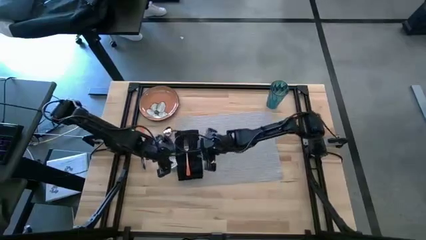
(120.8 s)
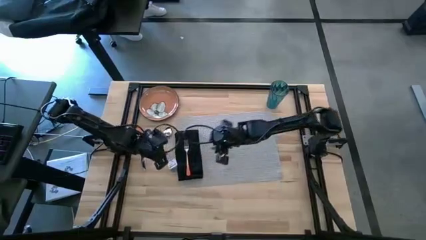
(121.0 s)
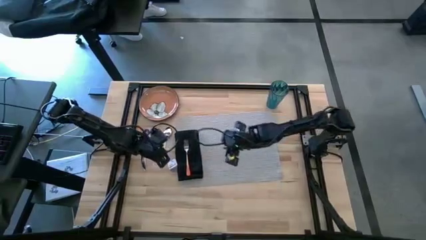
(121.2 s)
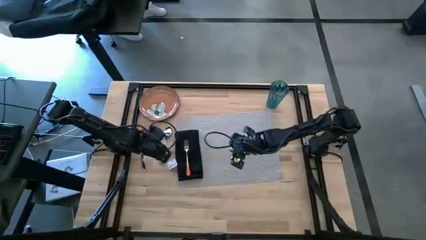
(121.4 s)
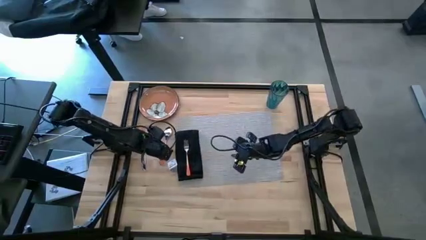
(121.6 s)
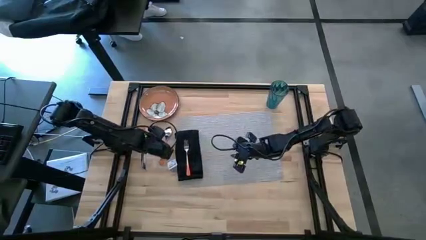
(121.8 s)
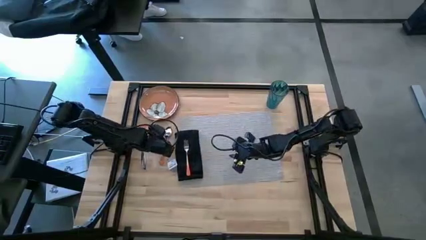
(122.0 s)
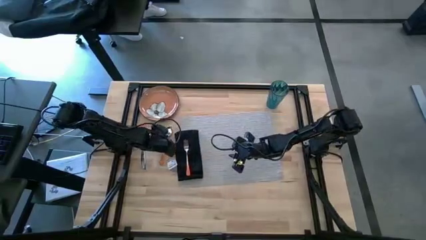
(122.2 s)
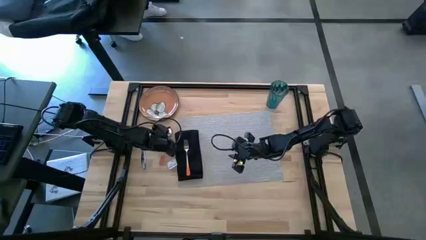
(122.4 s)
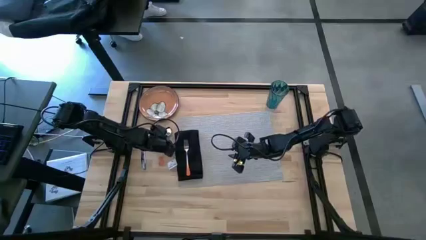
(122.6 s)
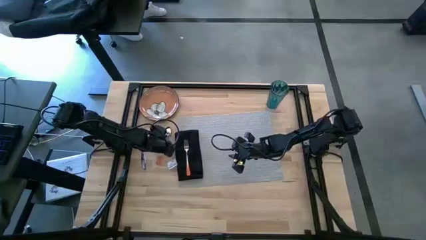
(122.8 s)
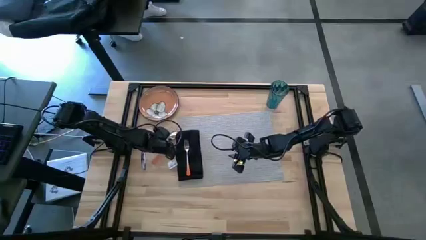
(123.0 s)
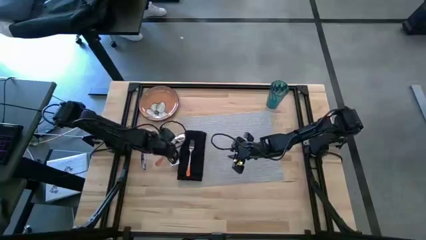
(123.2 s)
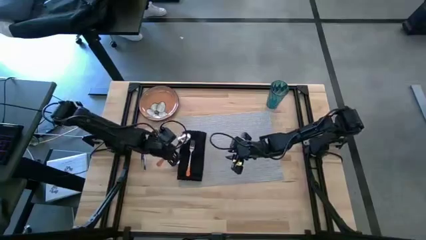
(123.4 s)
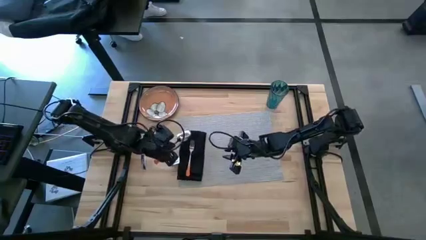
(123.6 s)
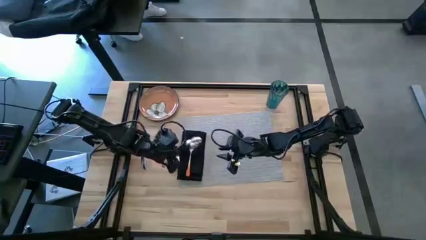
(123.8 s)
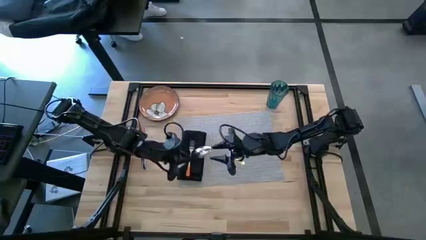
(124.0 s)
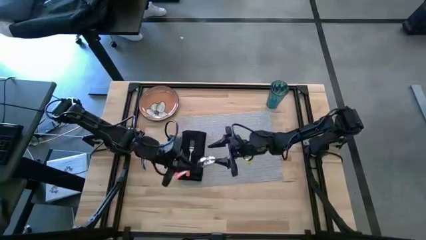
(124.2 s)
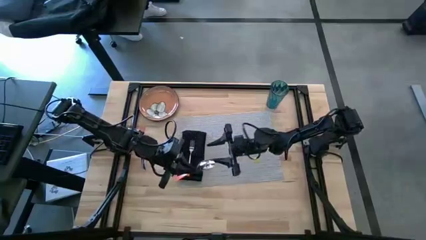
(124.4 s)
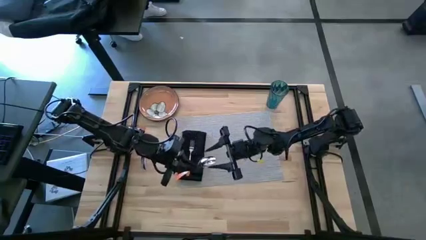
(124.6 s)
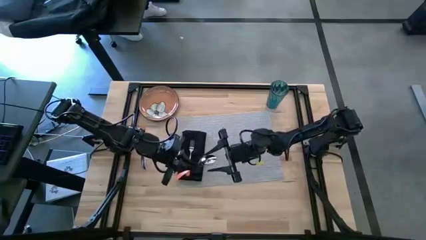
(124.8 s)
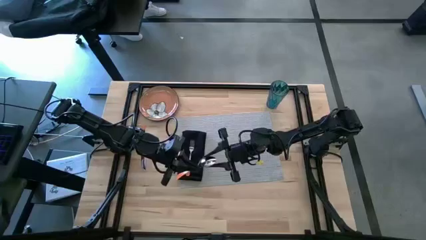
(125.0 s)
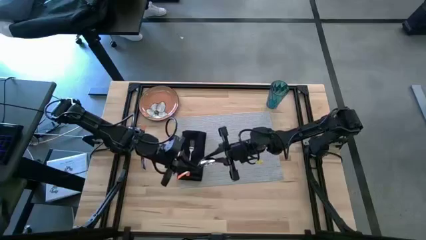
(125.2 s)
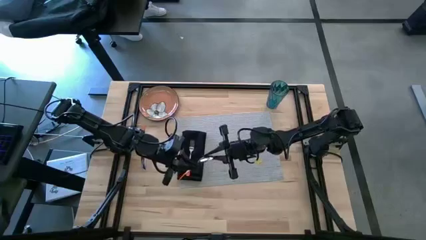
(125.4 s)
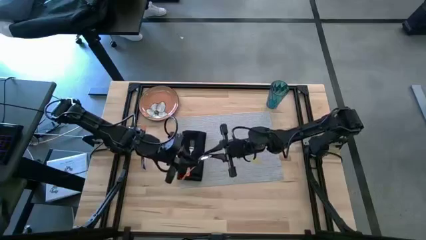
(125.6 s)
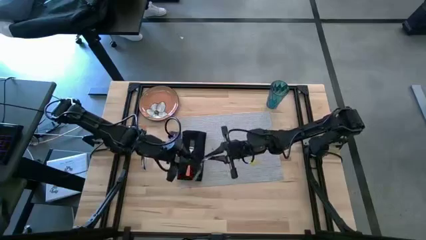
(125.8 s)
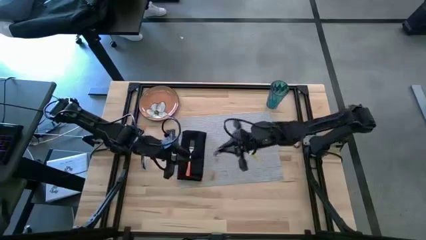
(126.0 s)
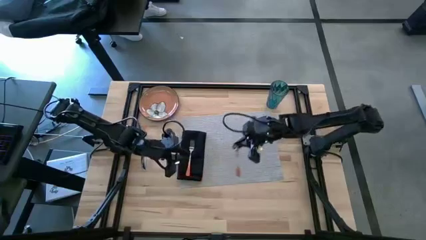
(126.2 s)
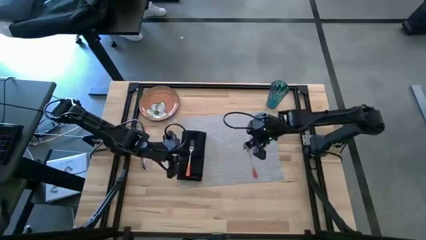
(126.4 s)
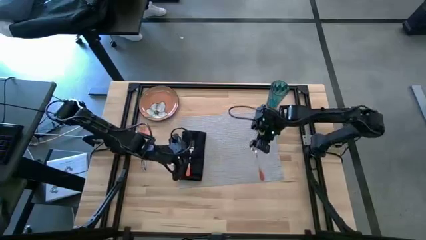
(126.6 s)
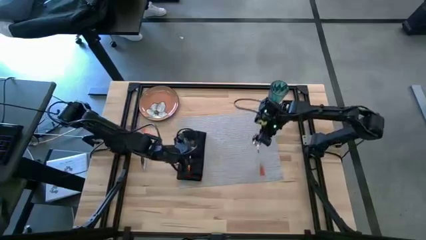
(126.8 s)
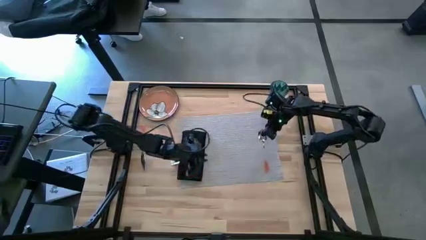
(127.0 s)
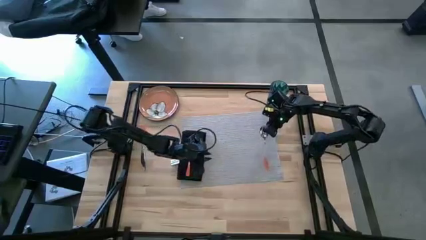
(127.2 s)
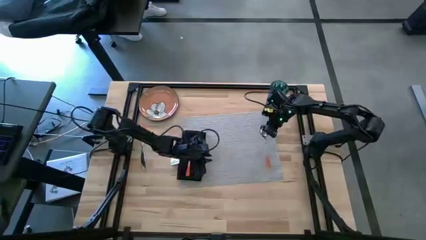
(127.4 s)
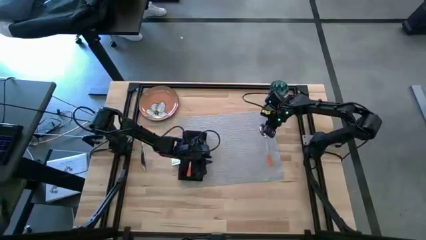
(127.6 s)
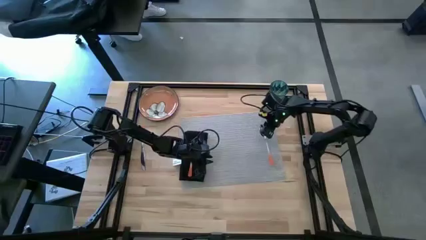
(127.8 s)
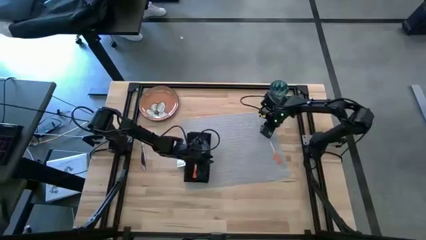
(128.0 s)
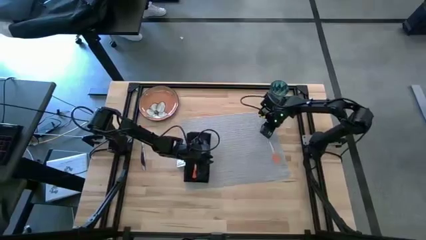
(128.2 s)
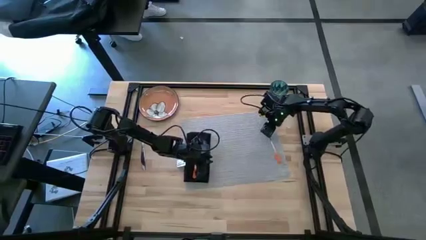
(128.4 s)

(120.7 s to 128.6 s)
Task: Set table place
Put the orange spoon on the gray table mat

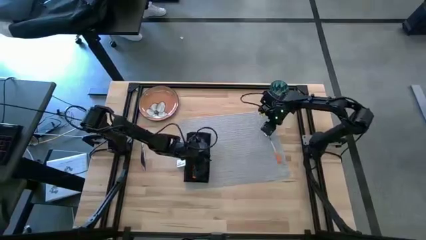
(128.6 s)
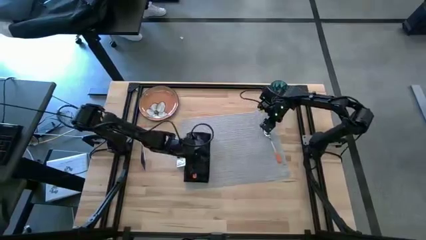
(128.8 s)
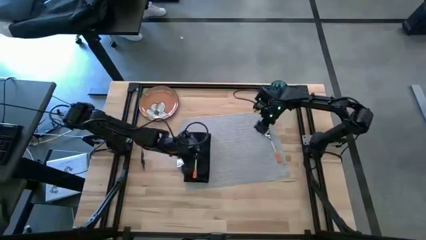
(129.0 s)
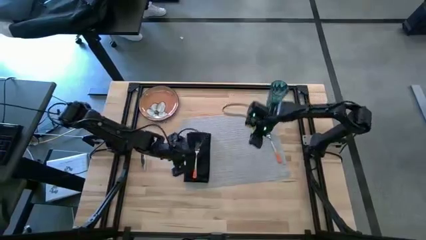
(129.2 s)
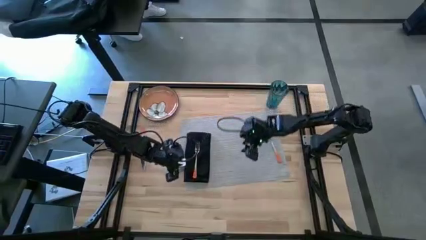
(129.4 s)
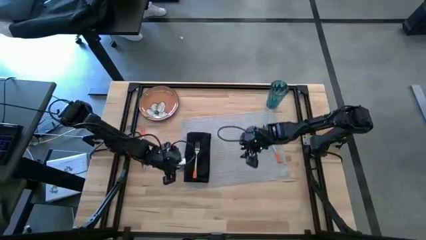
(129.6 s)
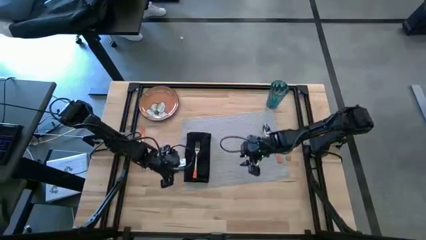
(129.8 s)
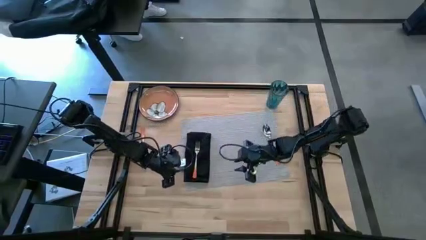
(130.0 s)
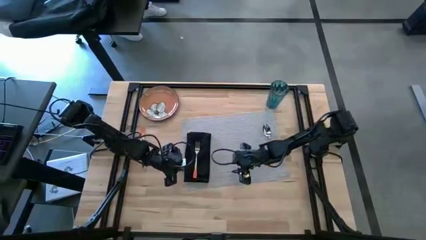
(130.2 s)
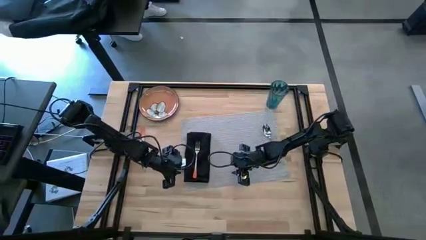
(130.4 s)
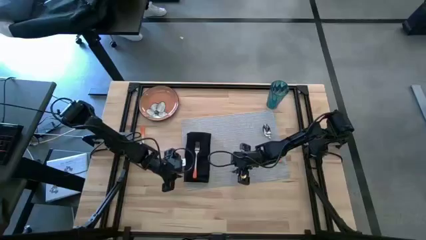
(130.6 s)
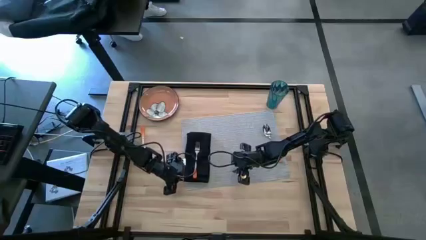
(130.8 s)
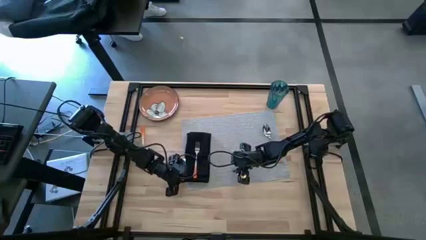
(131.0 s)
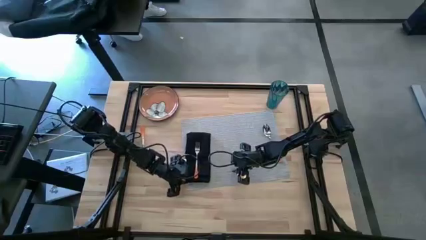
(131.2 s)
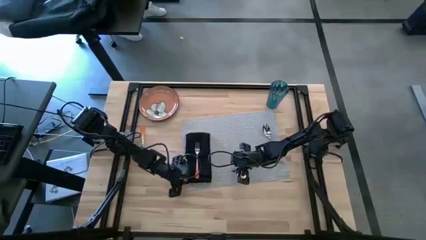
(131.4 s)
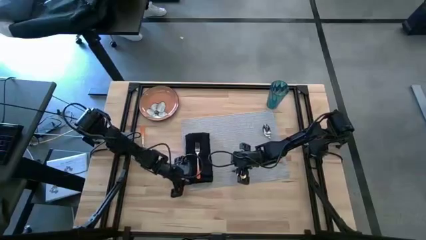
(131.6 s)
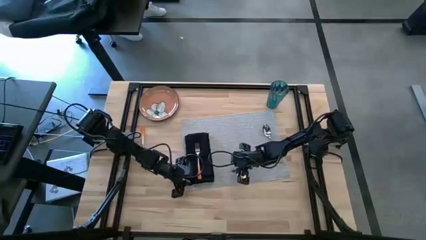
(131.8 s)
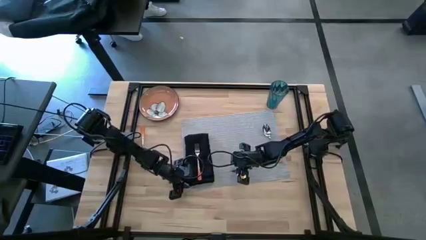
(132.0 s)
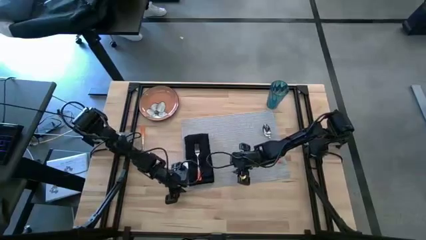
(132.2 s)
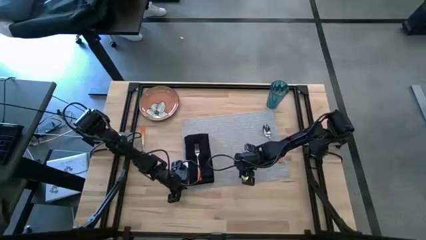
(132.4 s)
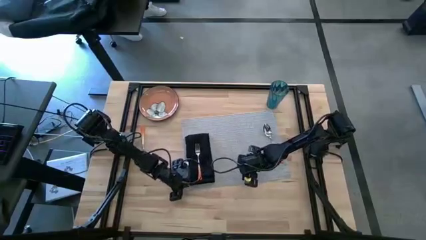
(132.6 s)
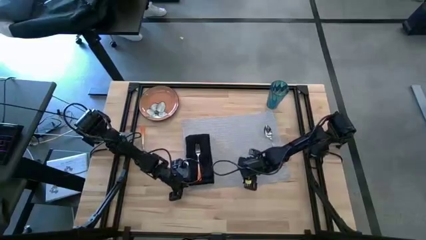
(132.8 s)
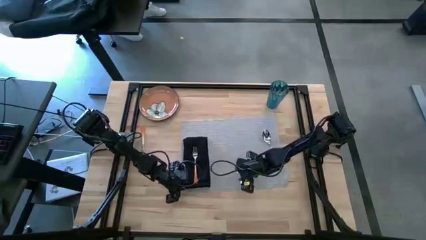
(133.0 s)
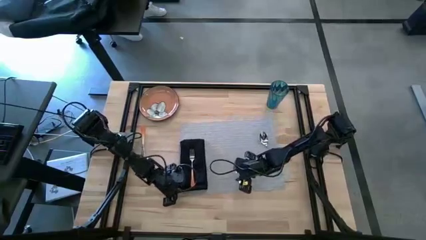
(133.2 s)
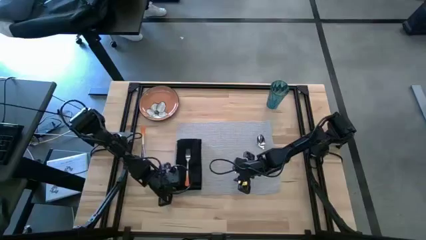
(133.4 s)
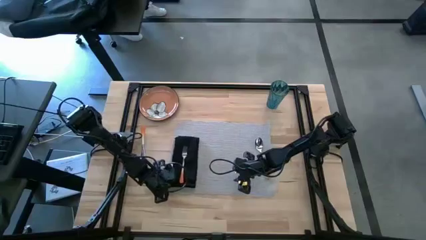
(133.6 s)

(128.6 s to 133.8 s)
Adjust the gray table mat

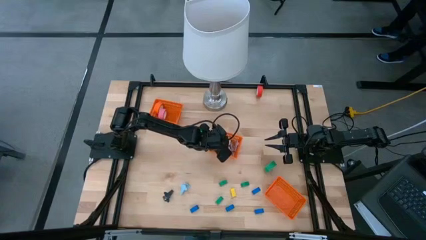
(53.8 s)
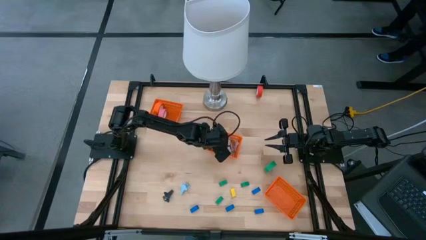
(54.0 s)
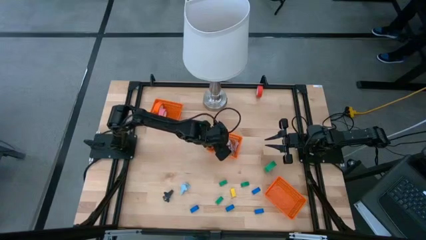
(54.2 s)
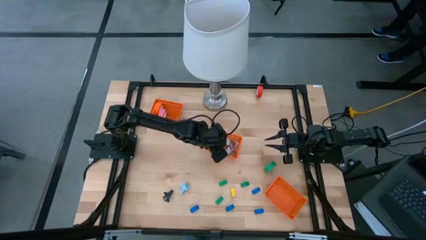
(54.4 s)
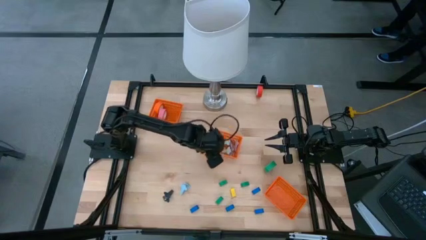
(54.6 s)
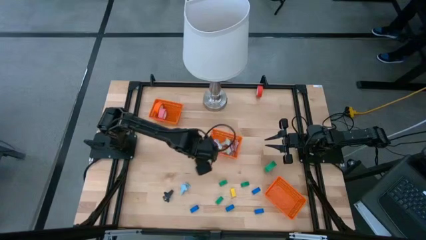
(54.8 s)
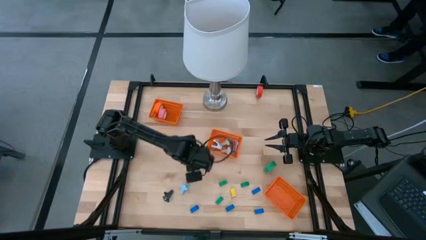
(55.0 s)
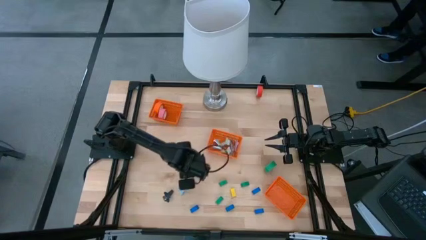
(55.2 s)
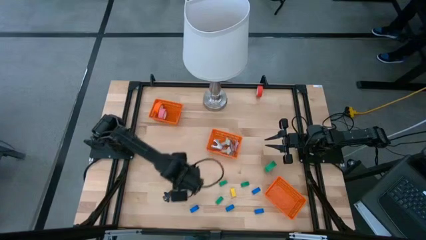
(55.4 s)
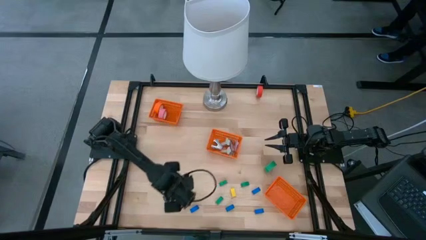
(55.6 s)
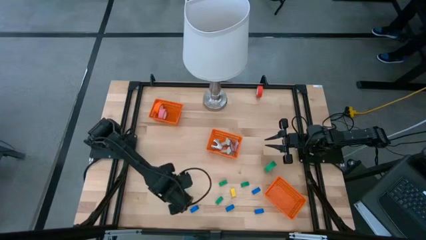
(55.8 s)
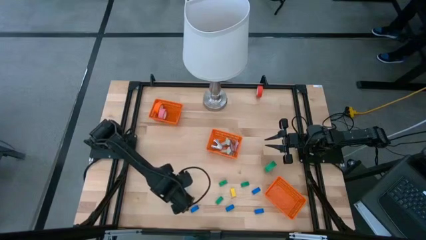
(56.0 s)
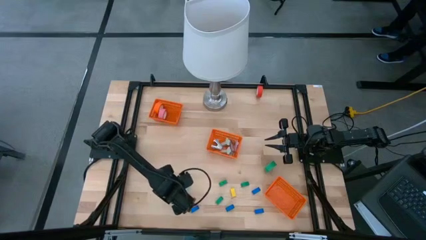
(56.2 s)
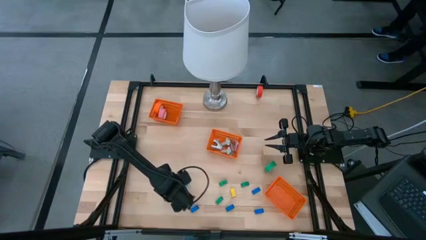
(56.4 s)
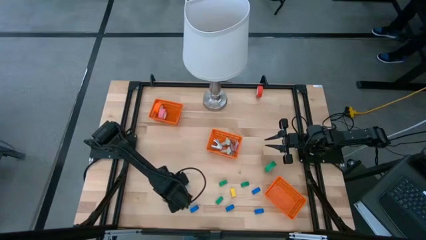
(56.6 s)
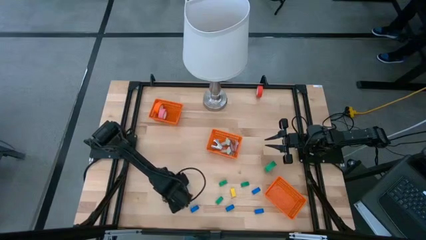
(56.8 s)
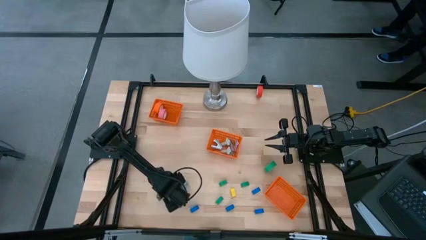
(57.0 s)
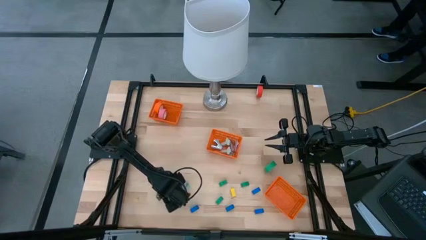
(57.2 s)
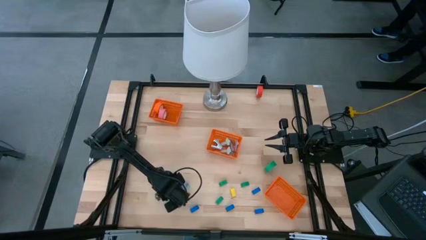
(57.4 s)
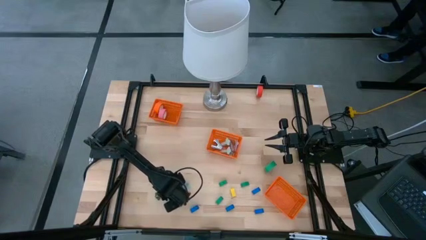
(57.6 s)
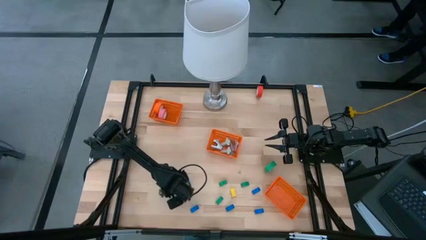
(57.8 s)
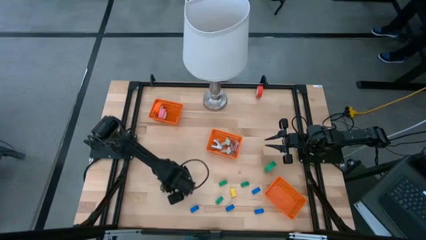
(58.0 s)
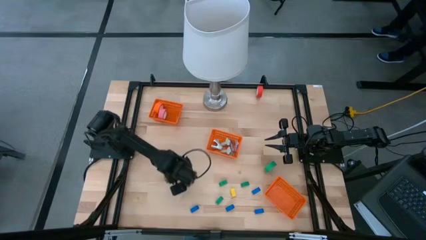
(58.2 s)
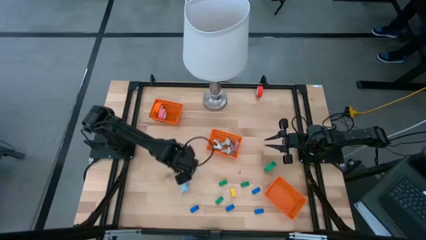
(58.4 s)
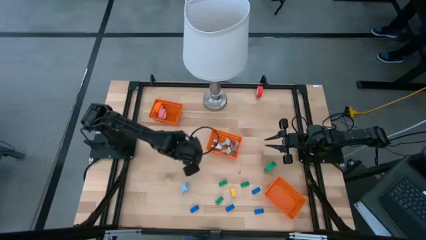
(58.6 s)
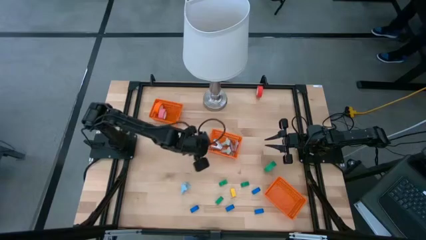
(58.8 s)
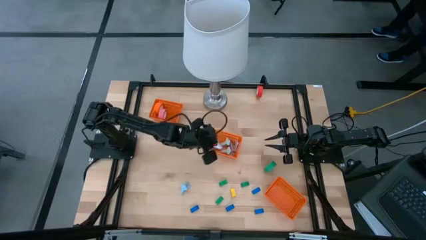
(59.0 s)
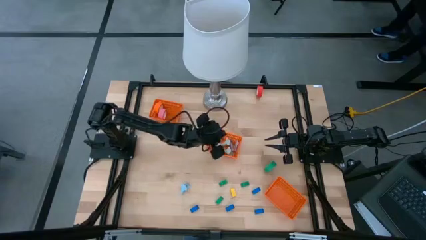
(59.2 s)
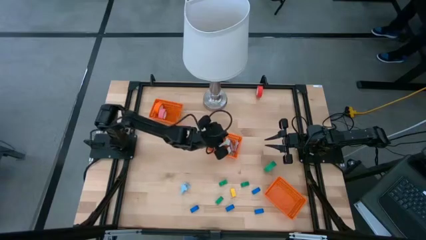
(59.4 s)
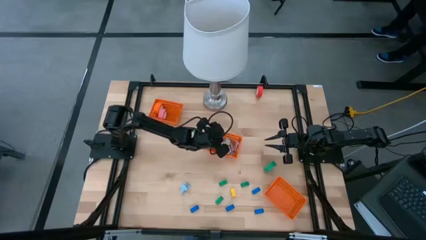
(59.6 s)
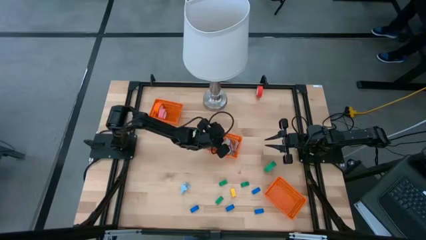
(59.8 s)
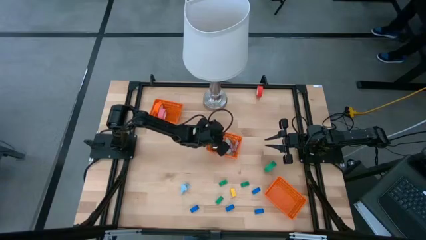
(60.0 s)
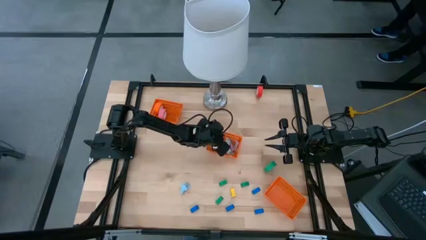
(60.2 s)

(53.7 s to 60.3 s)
Task: Pick and place Stapler, Stapler remover, tape
Put the black staple remover into the middle orange bin
